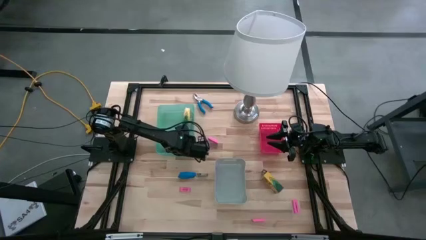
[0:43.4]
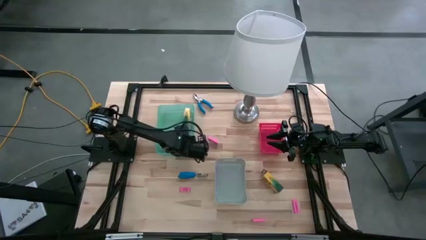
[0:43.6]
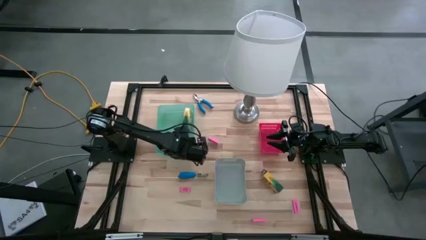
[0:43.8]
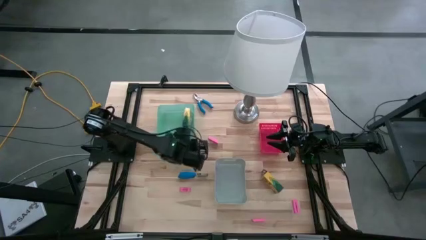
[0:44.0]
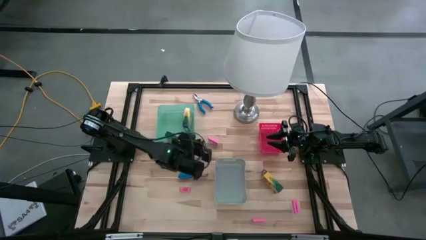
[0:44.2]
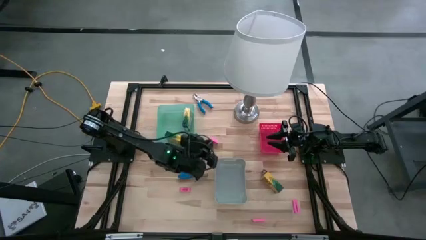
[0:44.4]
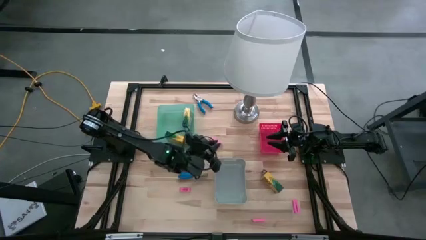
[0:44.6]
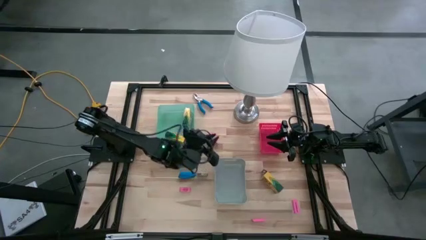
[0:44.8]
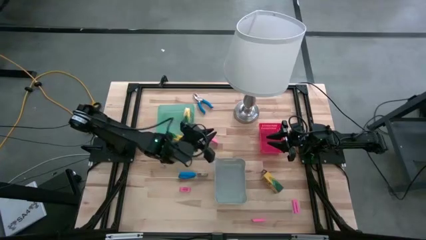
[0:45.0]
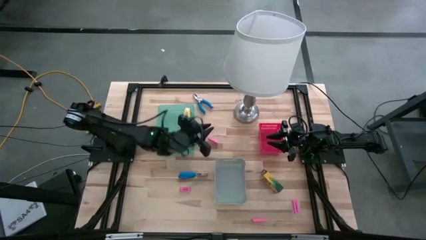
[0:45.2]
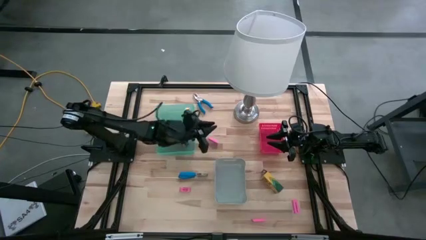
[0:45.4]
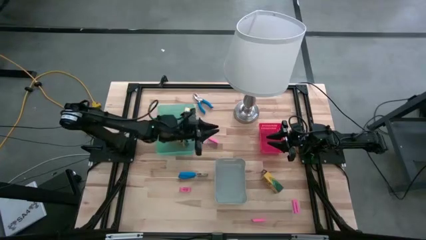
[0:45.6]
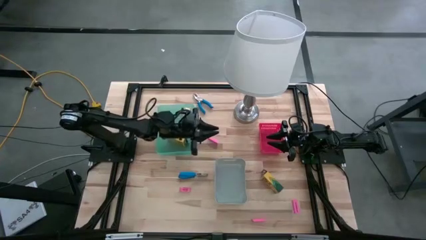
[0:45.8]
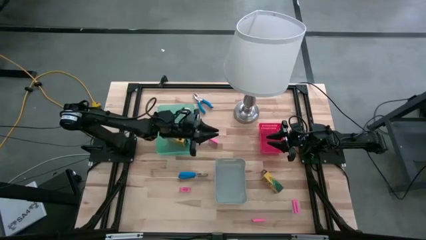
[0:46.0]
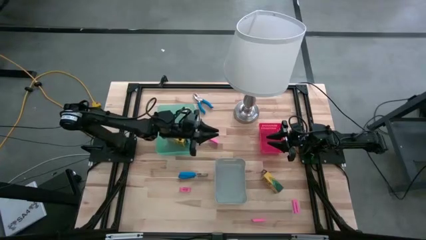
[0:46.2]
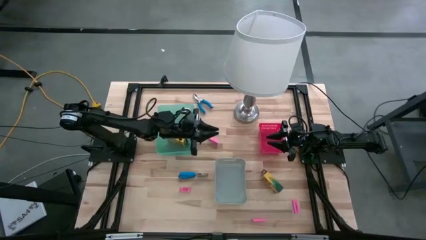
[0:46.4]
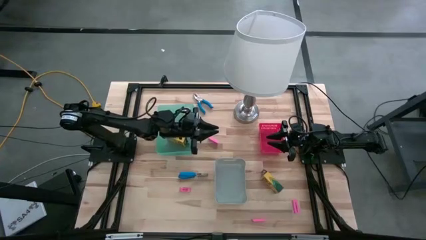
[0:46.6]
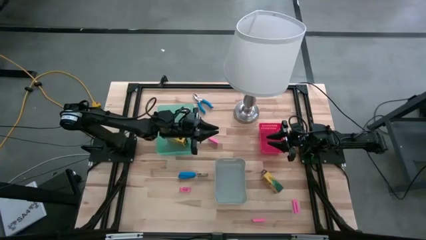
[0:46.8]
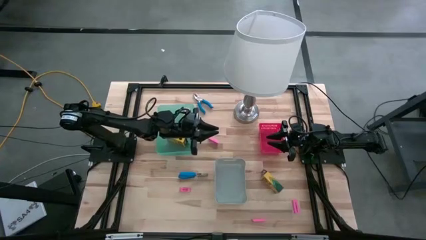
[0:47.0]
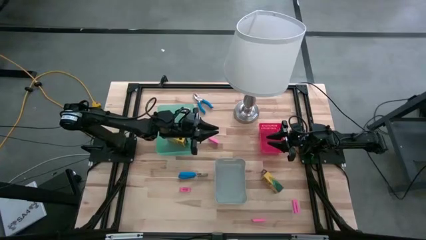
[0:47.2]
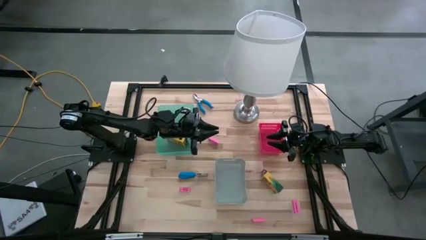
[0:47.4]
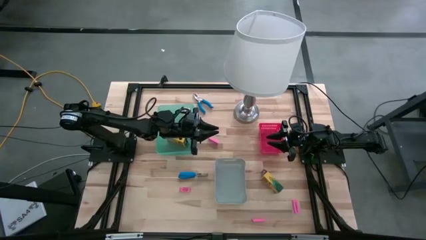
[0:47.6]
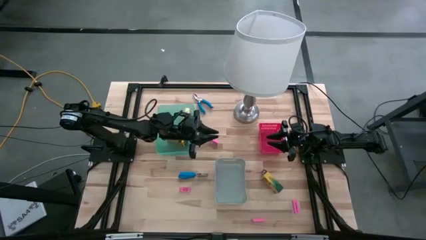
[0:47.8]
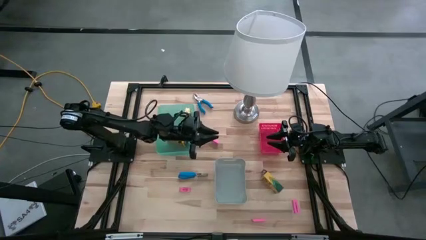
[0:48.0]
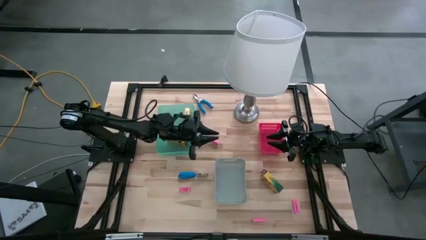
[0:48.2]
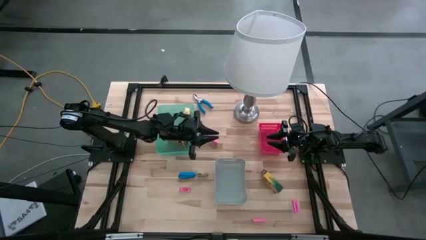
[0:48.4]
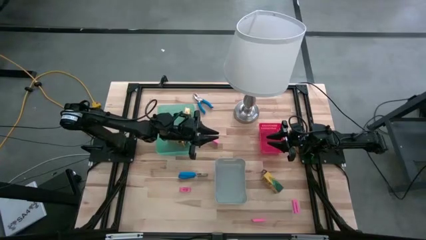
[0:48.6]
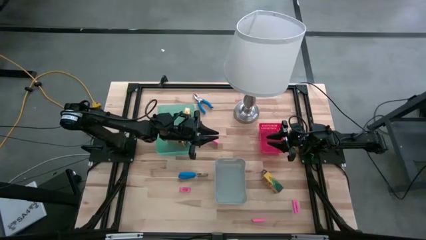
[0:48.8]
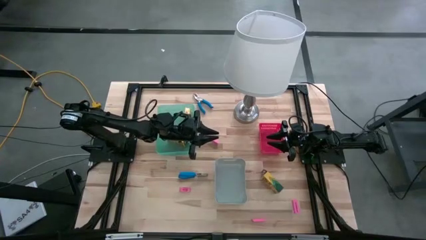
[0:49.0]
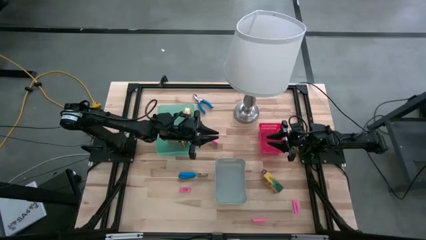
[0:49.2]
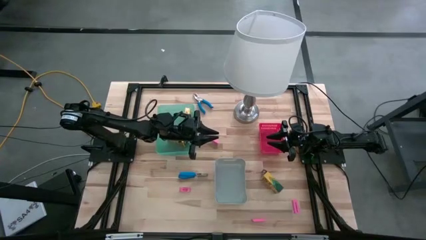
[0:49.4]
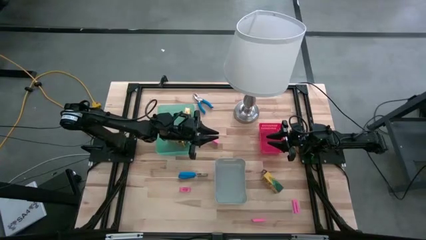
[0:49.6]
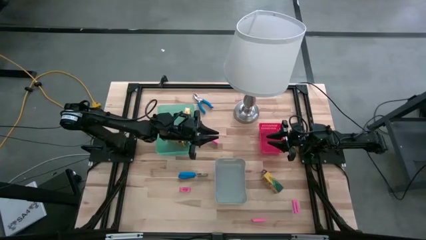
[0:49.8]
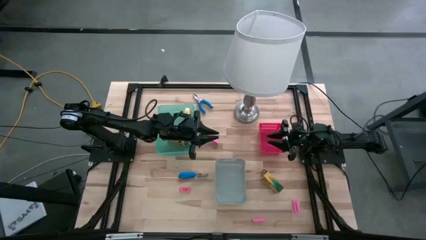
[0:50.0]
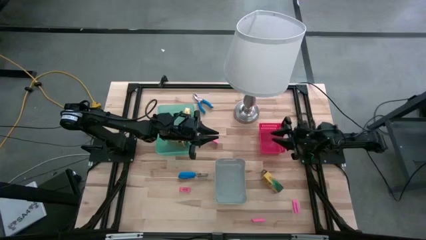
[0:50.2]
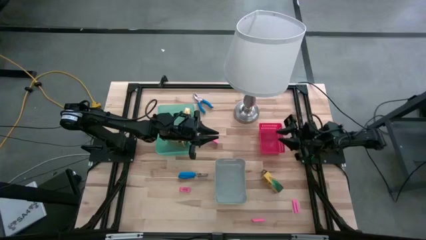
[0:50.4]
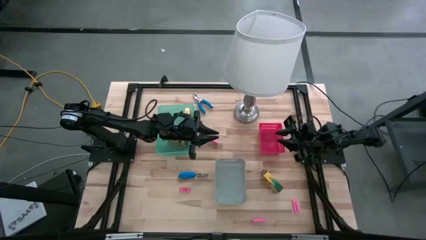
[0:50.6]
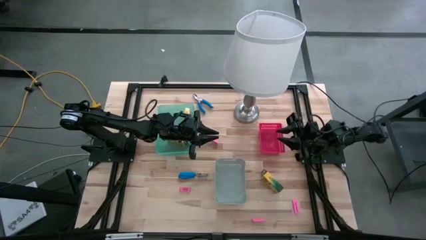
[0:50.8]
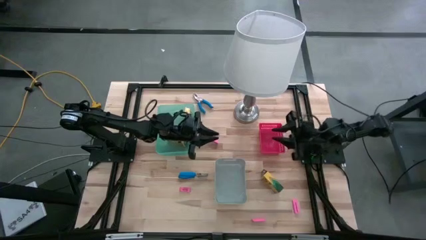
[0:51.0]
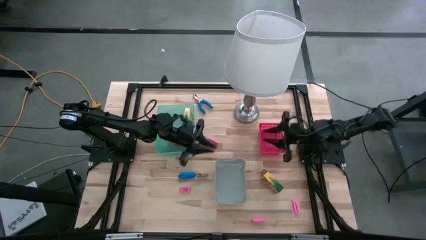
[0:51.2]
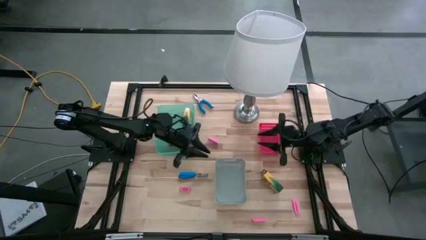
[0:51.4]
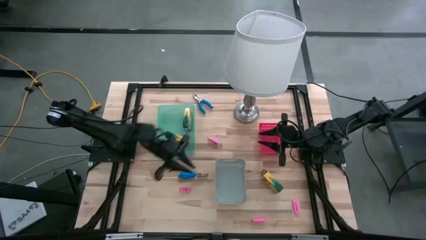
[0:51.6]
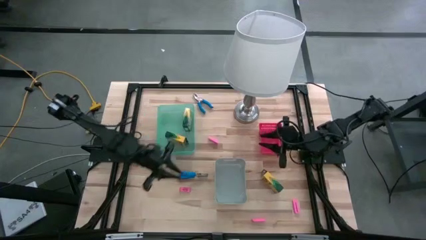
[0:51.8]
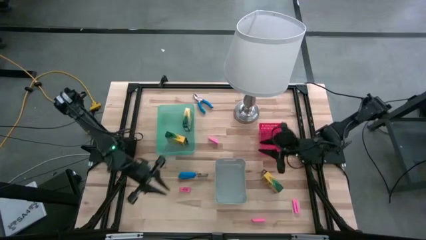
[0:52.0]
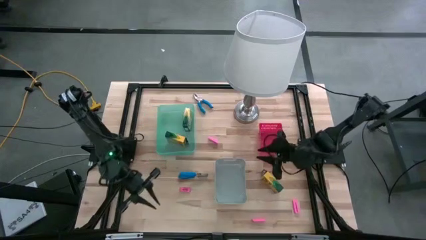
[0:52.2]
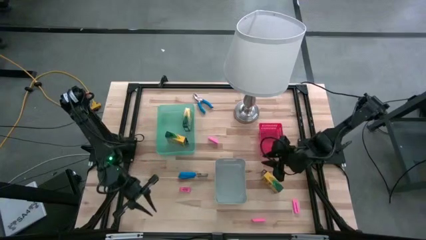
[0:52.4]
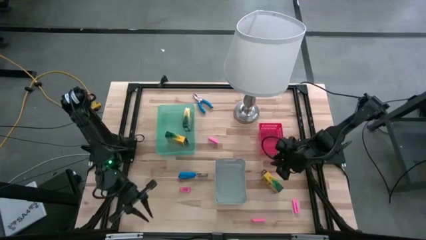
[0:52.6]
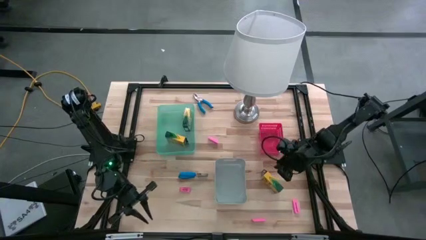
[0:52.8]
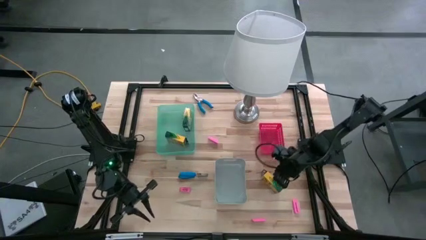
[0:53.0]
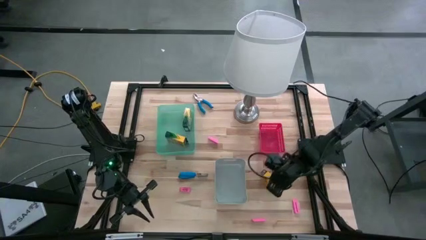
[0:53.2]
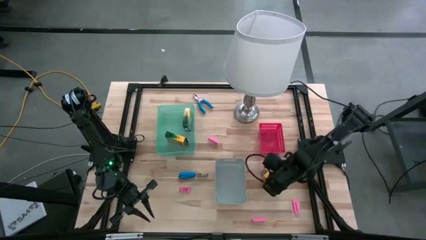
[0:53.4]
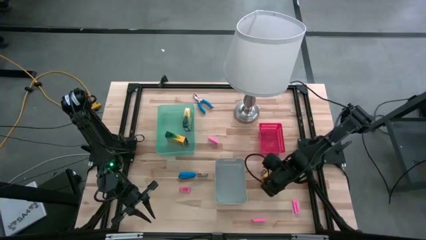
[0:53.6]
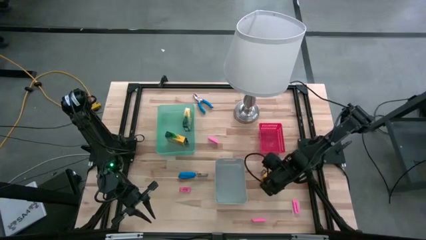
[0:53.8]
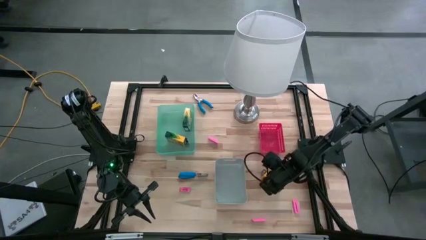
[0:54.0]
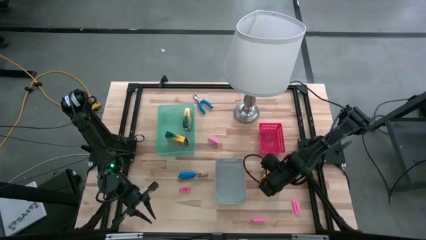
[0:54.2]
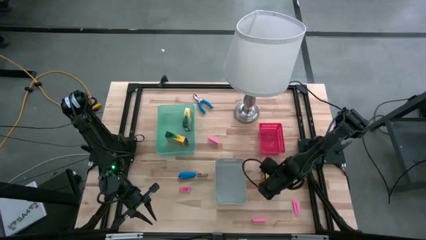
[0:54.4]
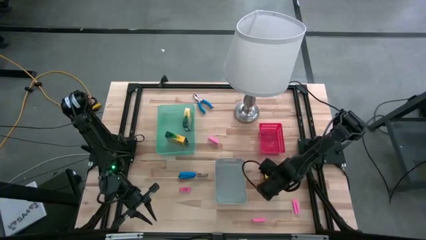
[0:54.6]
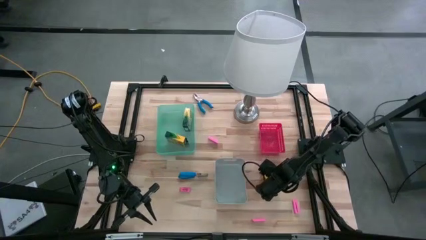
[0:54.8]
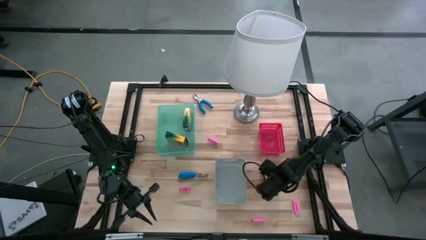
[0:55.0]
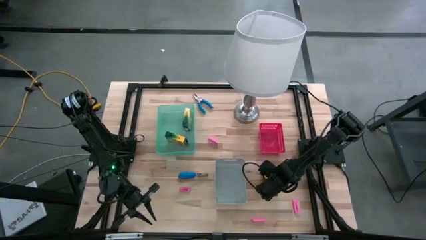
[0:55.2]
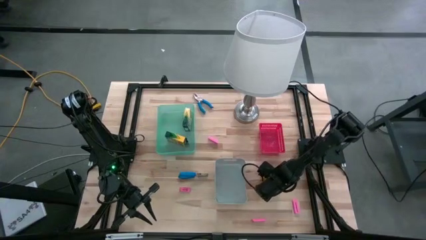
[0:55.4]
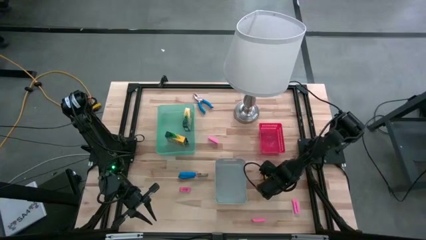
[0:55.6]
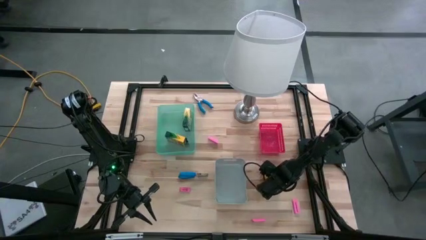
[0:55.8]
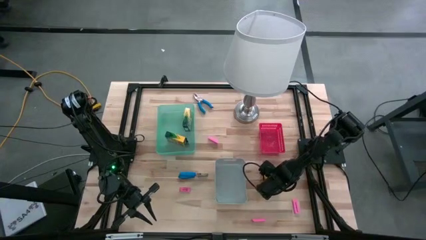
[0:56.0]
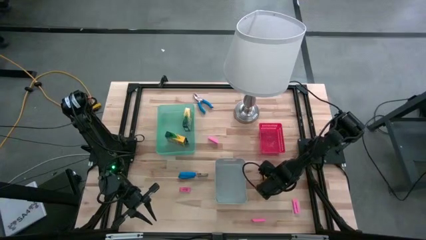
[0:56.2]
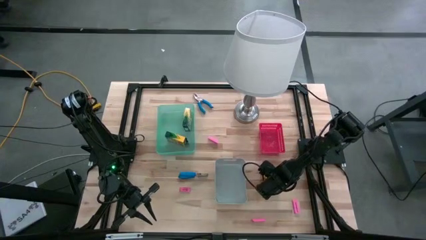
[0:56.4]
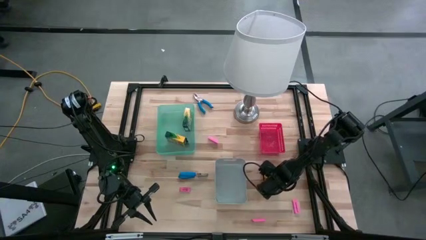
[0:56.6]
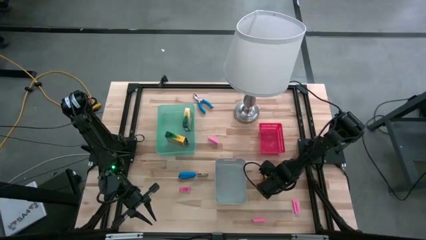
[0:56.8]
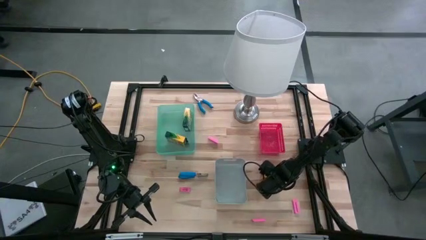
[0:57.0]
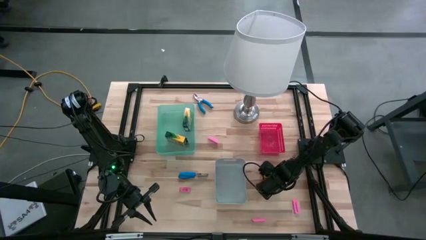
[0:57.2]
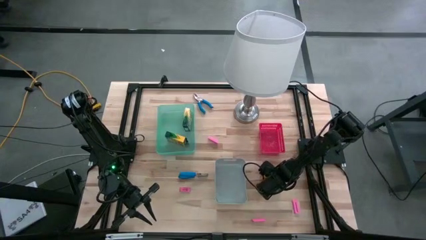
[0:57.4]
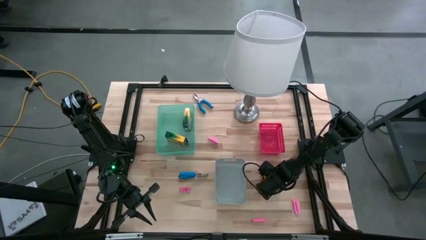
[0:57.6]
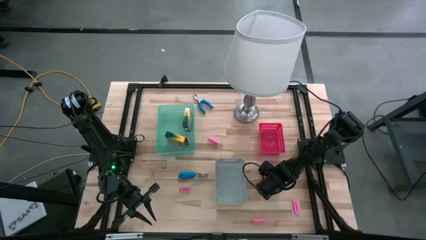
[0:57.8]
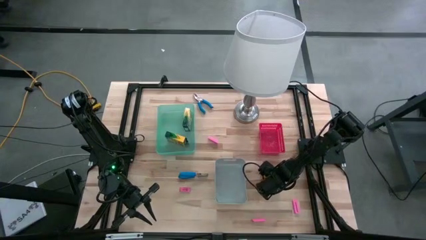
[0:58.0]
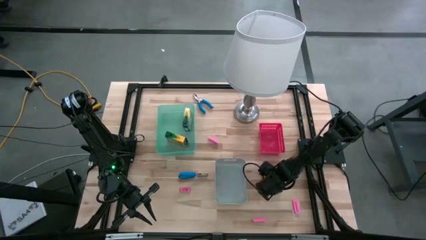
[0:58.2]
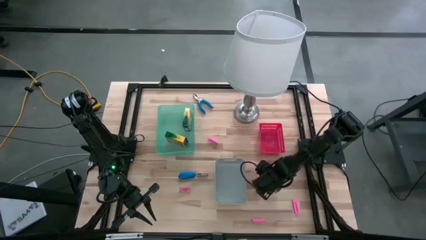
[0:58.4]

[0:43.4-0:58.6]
Task: Pick & Place School Supplies
Put the crayon box into the green bin

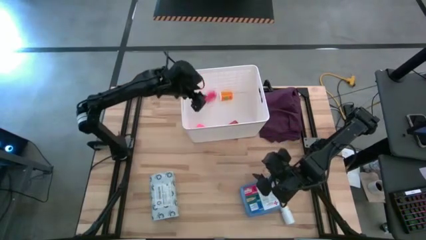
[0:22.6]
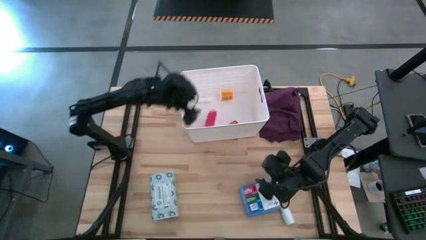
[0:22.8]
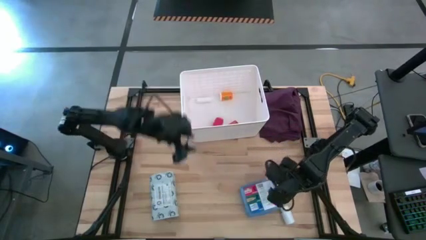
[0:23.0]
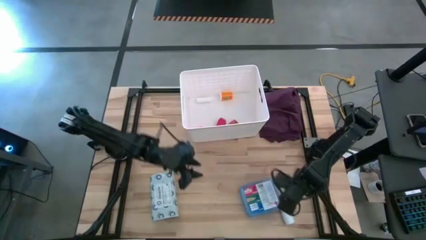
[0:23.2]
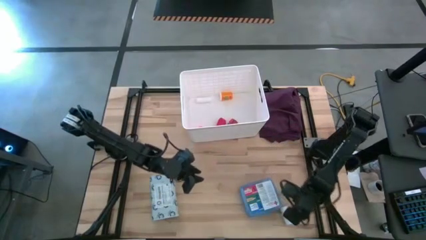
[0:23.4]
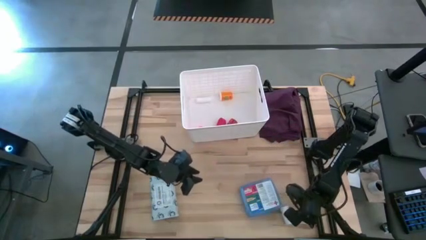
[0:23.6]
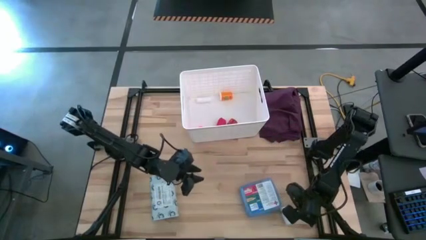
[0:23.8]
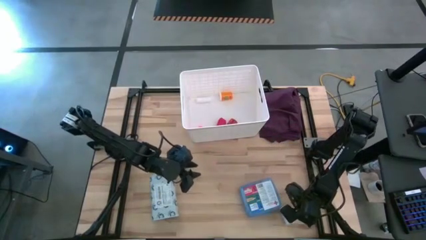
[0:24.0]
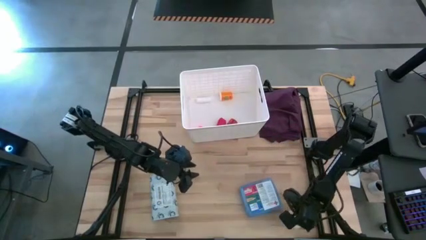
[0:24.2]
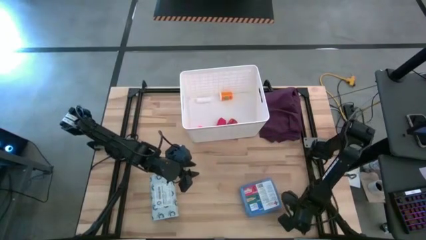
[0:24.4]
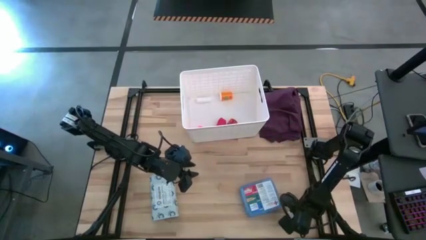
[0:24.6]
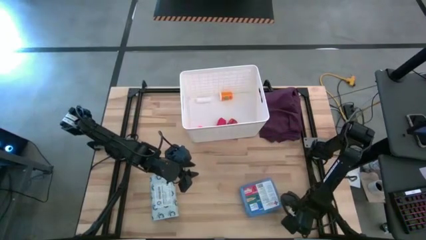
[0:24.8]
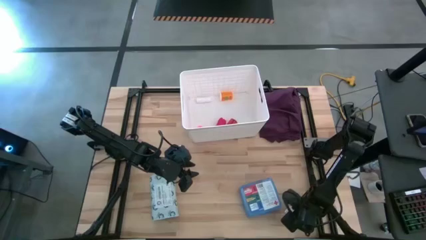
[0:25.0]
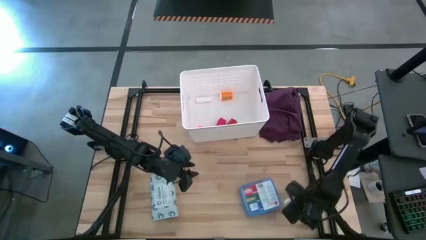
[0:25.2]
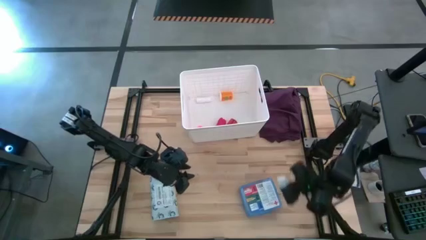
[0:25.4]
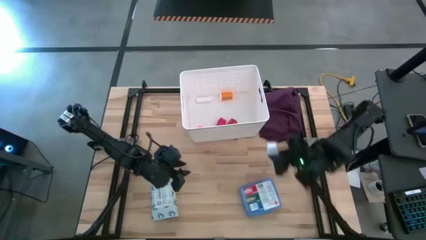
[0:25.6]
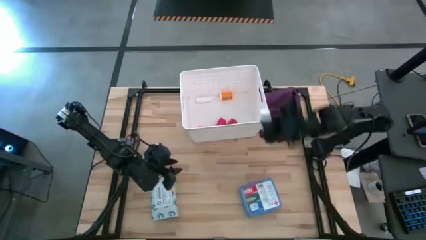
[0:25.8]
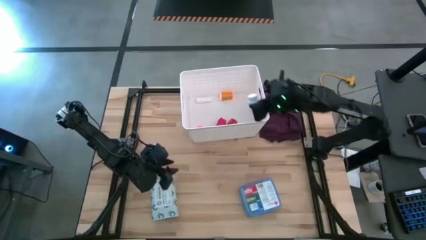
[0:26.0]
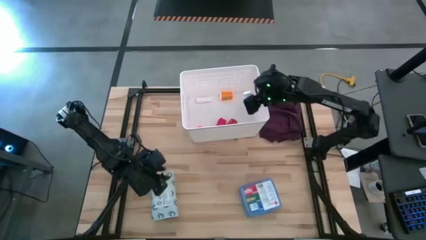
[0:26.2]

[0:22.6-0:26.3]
Task: Pick & place medical supplies in basket/bin
Put the white pill bottle into the white bin
